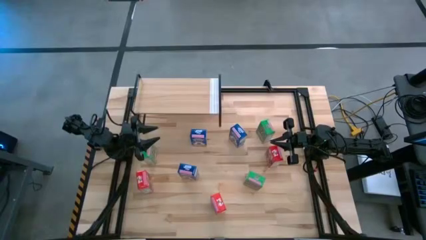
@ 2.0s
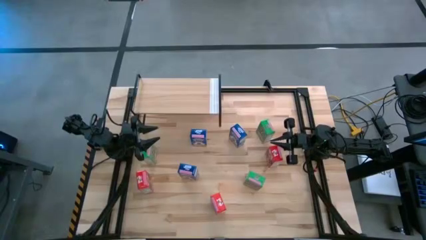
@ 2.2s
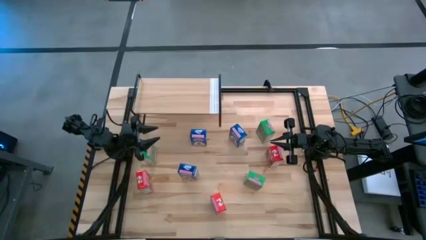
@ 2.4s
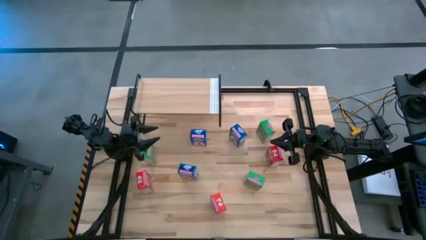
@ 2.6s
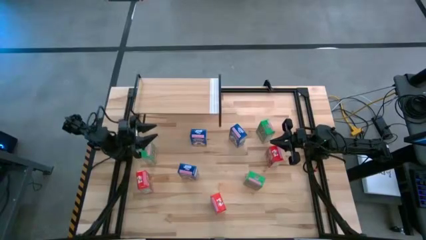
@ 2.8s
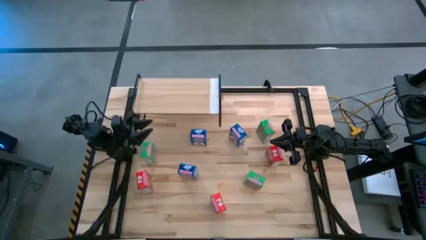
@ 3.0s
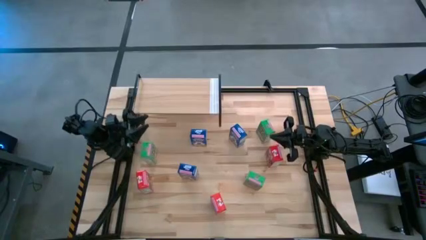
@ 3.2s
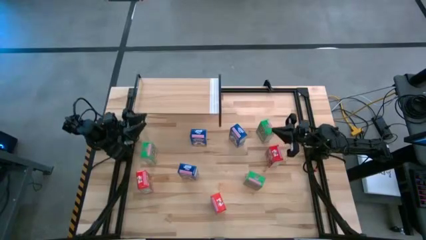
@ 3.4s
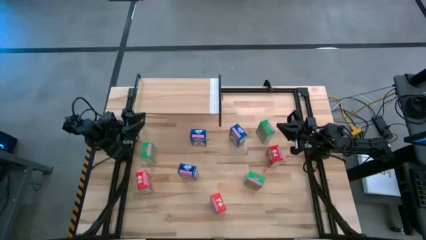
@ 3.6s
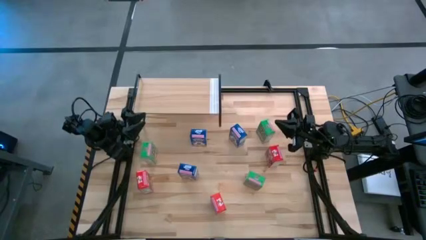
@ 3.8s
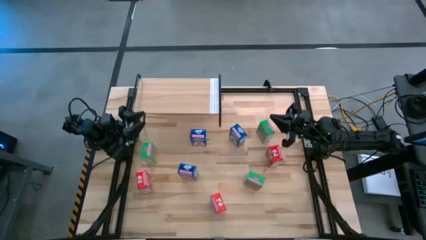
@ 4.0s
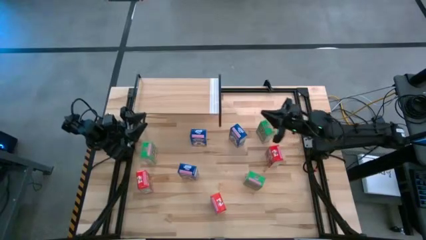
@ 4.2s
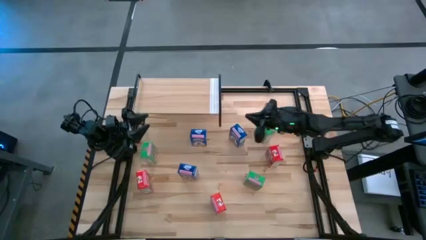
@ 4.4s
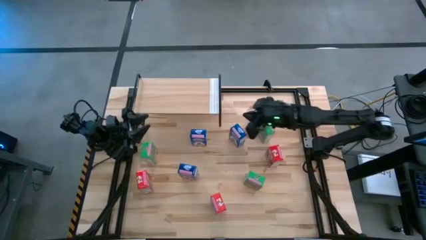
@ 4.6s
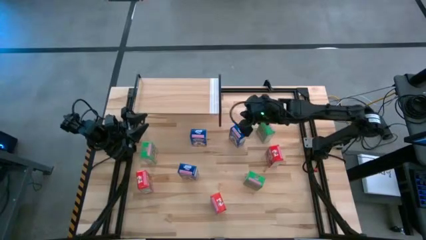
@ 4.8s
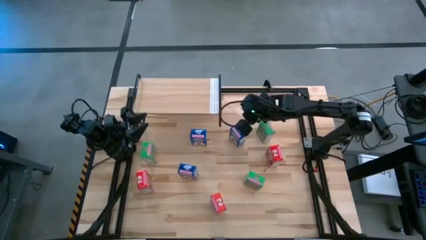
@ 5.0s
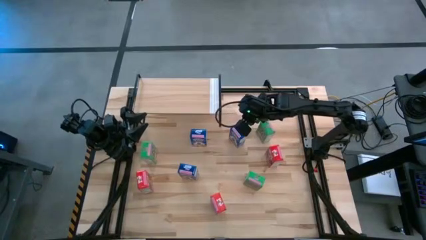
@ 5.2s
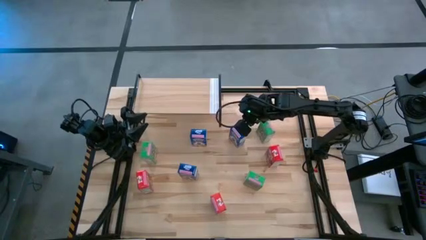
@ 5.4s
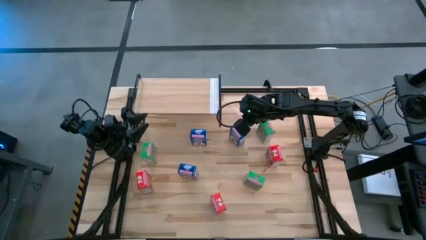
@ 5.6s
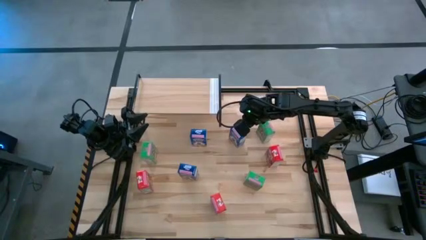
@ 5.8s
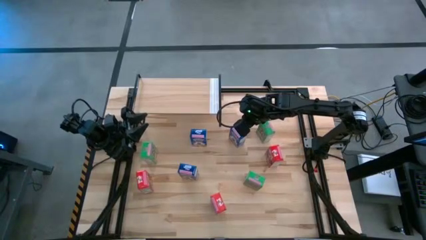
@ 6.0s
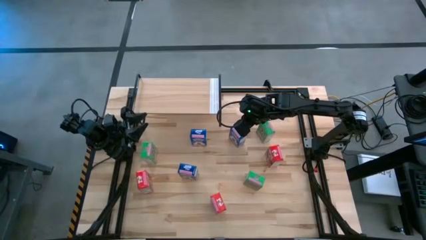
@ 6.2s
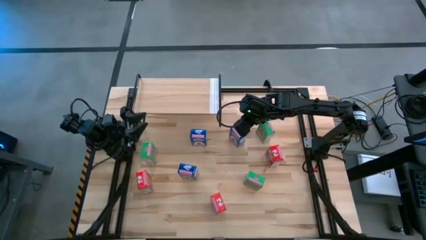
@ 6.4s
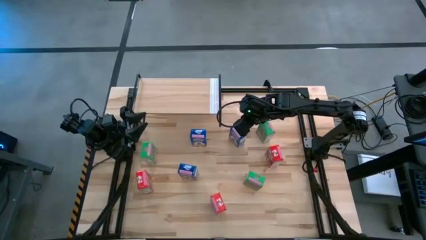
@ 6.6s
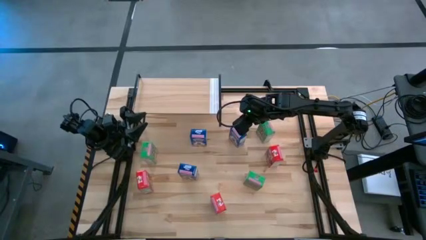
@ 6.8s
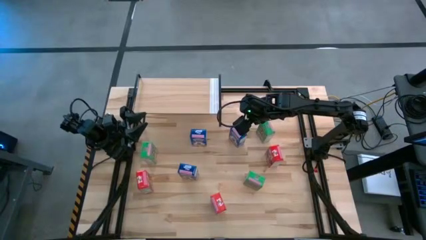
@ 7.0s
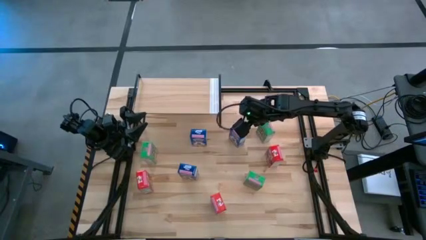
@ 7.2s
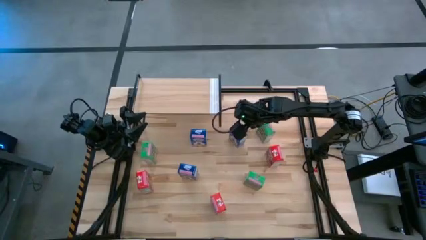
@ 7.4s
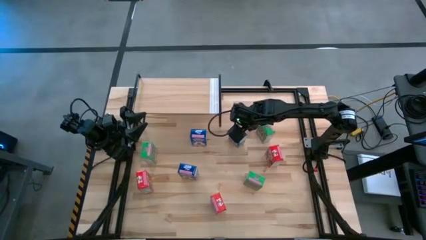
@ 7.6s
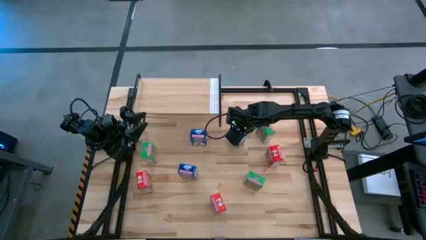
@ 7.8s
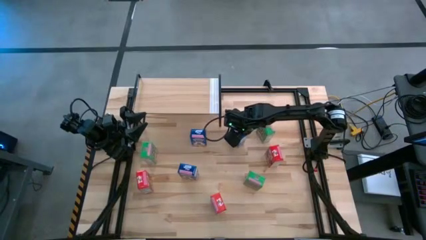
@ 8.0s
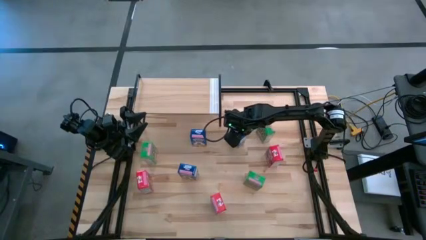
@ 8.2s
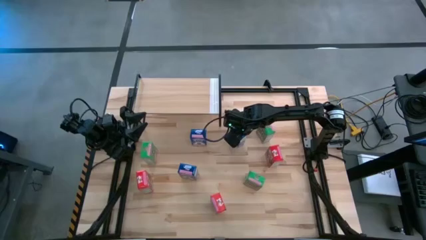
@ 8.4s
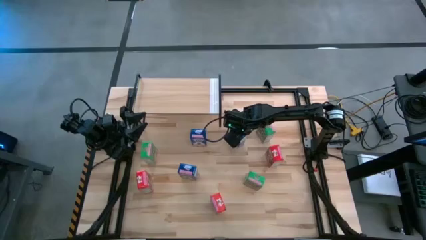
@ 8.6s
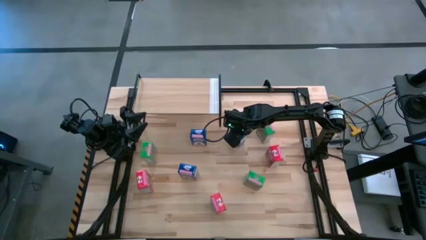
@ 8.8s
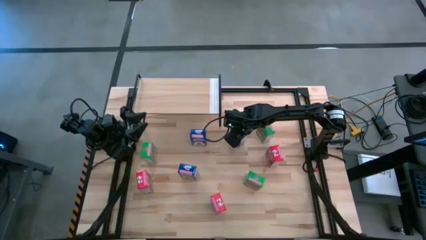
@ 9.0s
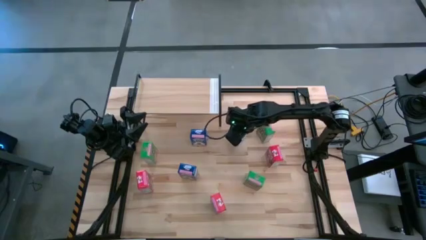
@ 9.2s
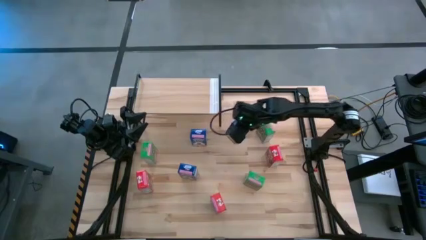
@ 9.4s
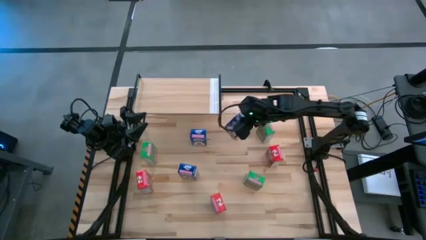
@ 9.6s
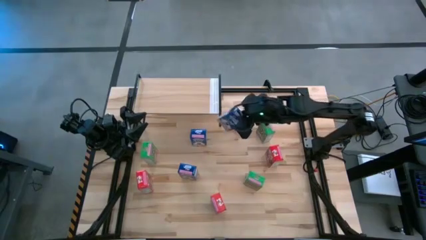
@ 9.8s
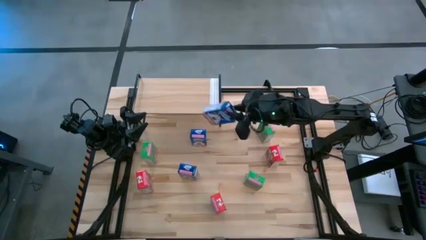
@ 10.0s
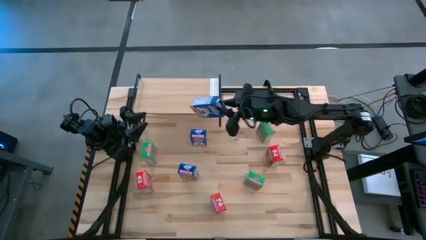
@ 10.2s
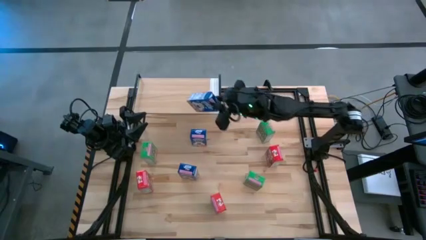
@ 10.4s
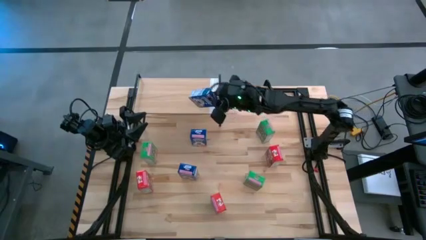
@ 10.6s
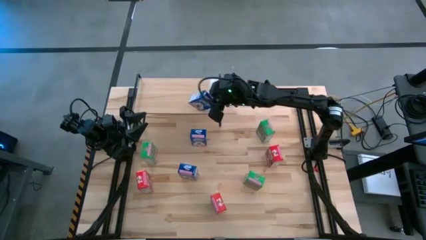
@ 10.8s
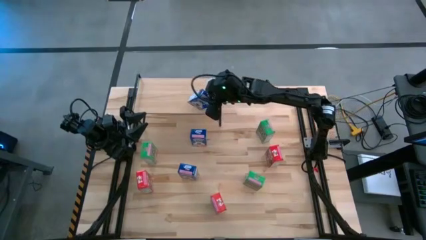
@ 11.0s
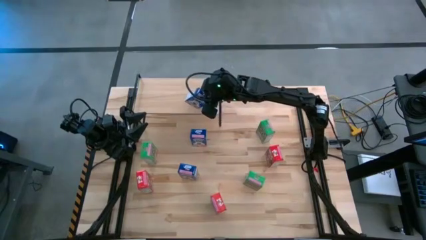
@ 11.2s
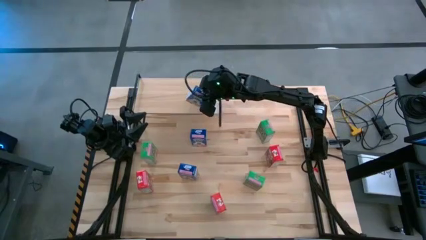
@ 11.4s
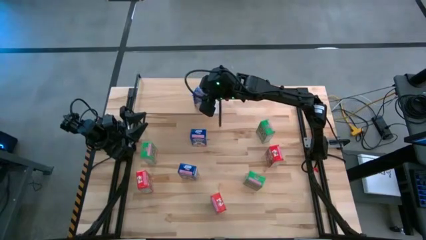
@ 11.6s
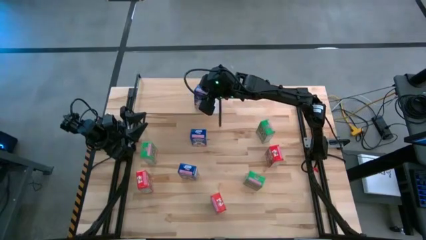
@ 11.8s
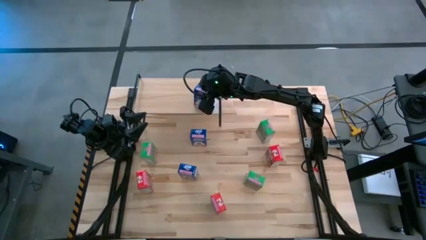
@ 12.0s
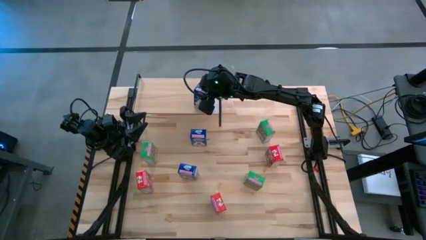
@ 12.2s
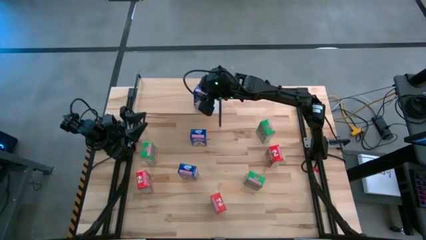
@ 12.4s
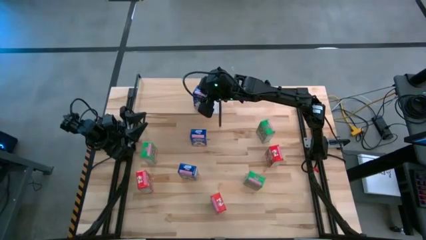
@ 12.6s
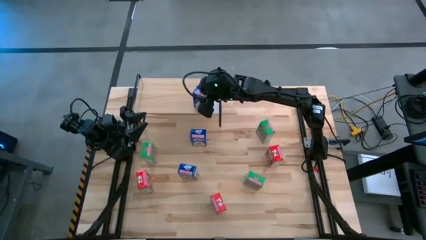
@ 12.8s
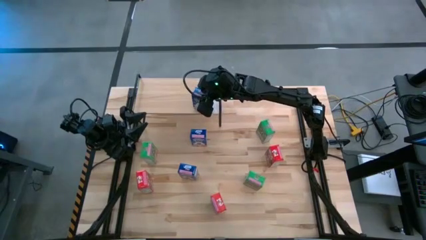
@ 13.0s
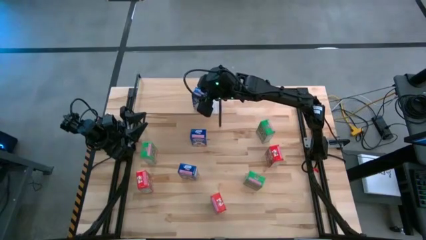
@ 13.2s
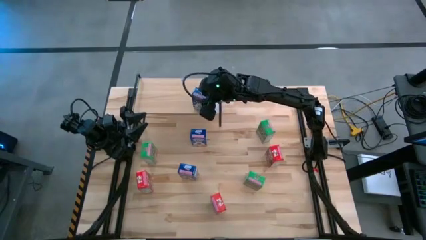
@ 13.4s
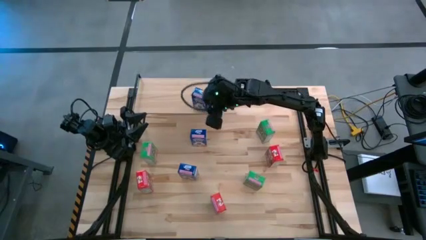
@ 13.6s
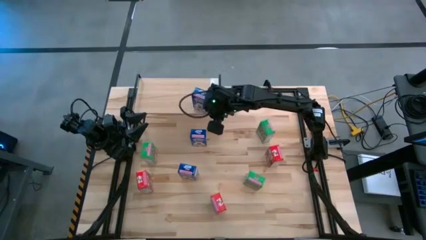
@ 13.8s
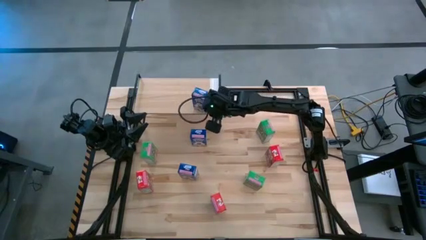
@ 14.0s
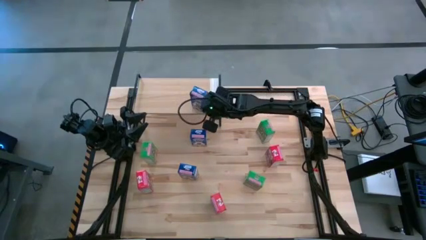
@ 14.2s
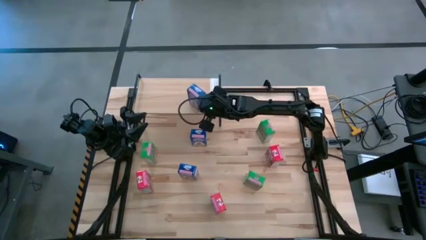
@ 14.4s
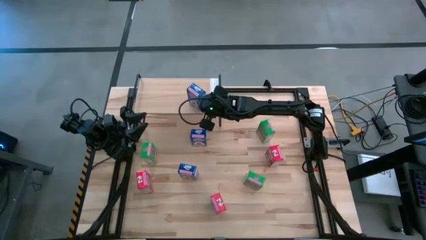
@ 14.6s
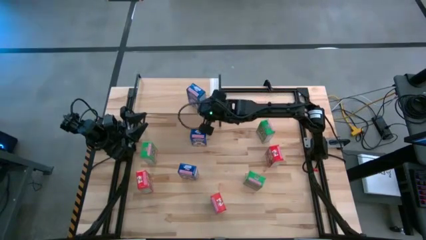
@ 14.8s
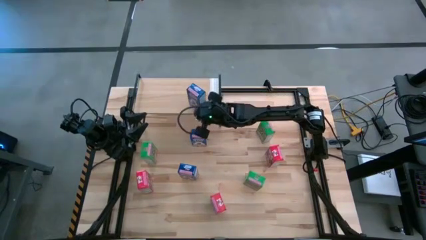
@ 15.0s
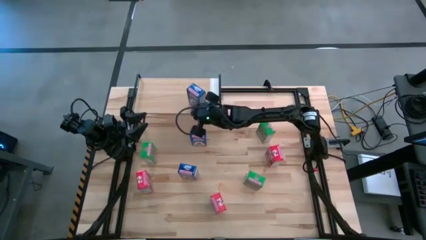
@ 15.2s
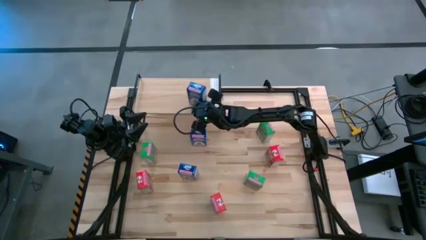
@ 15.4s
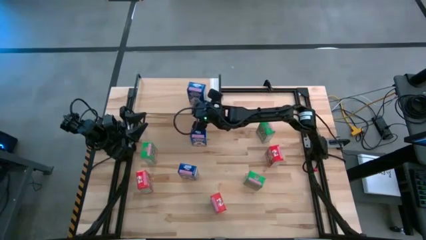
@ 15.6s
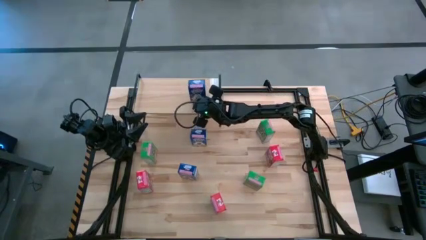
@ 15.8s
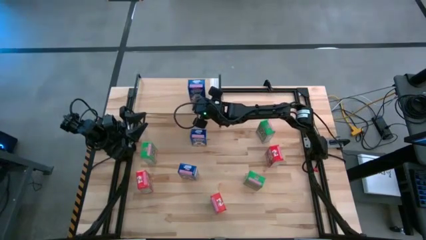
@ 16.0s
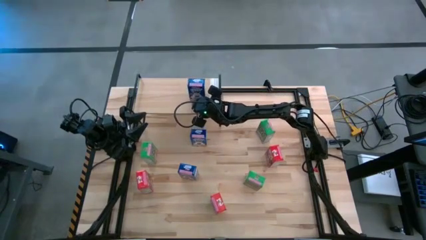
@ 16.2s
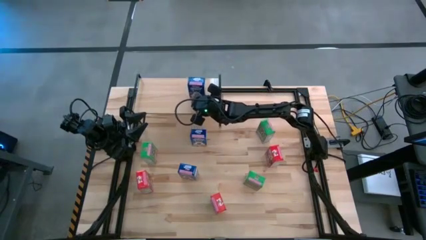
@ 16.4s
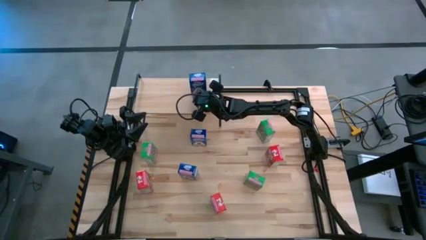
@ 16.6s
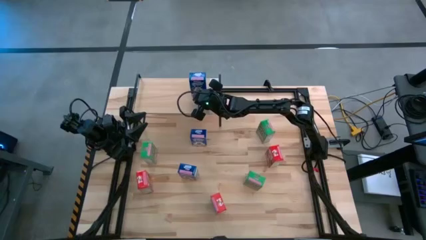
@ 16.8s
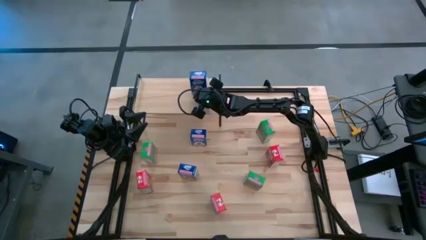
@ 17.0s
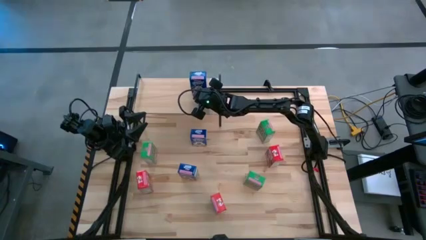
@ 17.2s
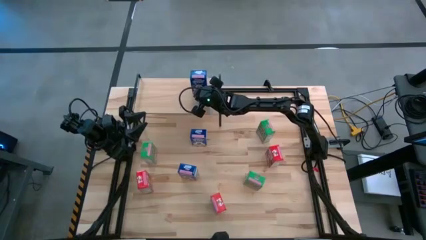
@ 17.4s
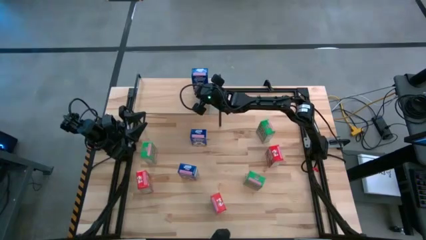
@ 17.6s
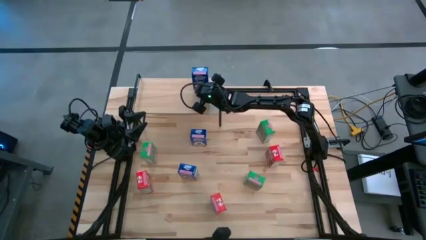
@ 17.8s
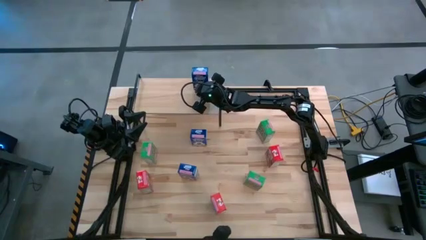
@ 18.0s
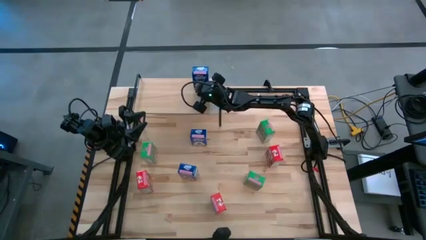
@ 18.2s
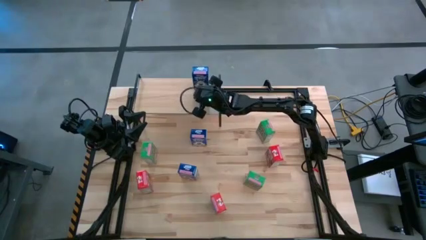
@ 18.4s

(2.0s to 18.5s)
Task: Stack cereal on shelf
Put the top right blue cereal box on the shelf
